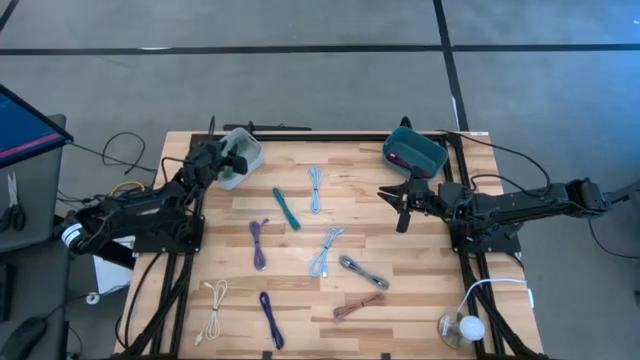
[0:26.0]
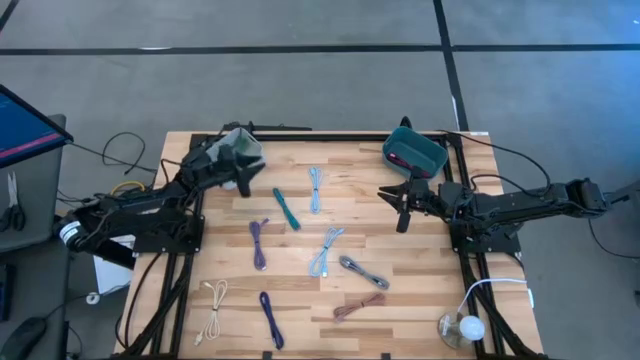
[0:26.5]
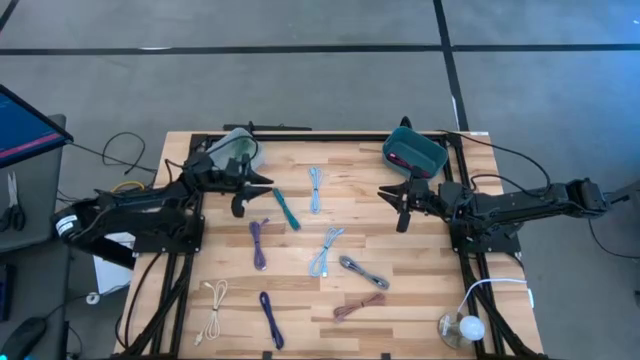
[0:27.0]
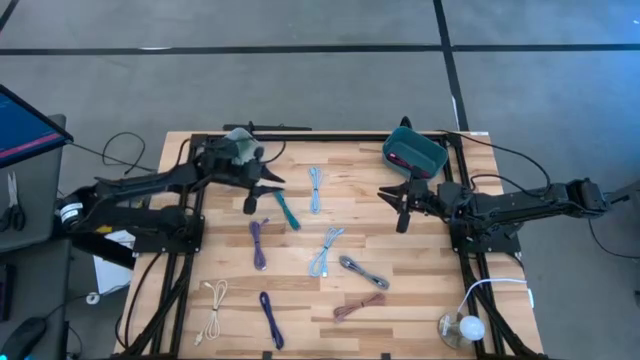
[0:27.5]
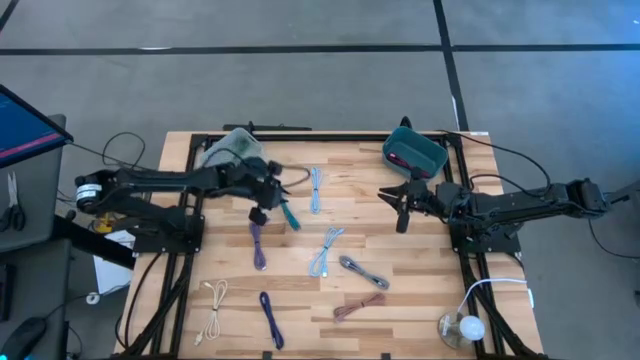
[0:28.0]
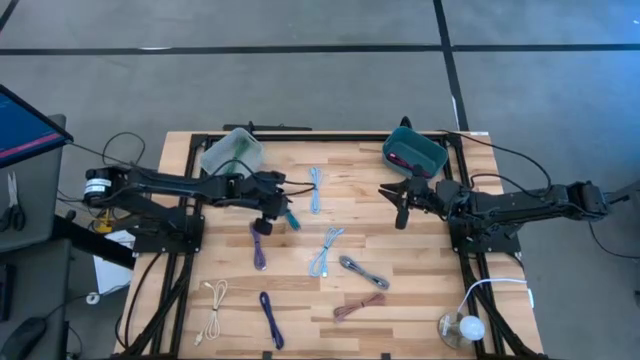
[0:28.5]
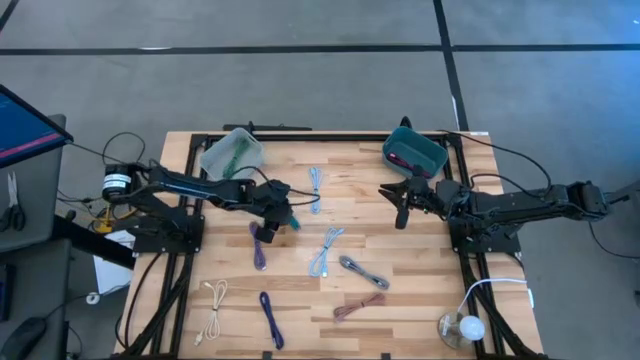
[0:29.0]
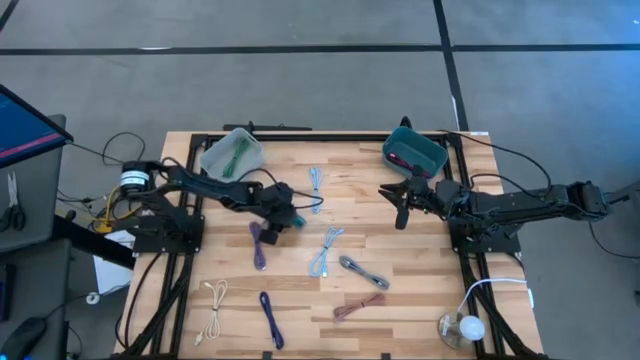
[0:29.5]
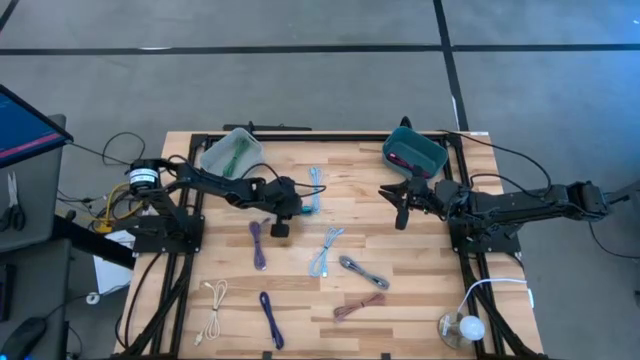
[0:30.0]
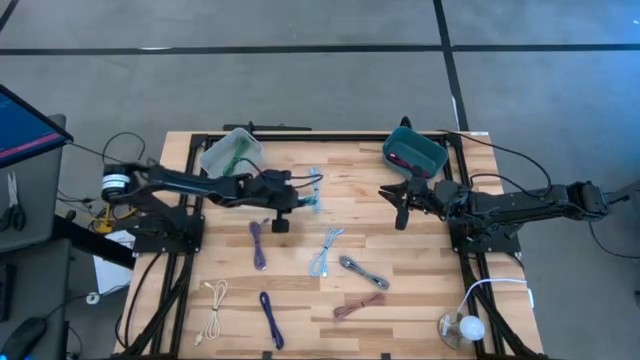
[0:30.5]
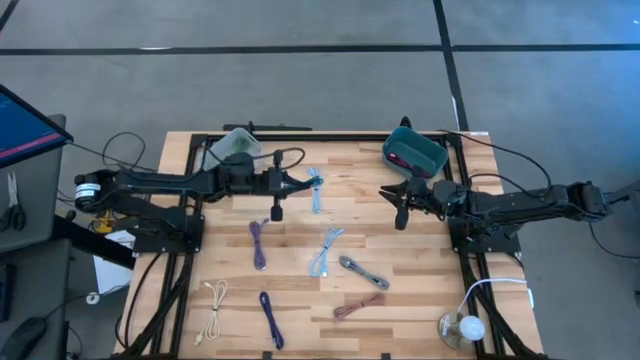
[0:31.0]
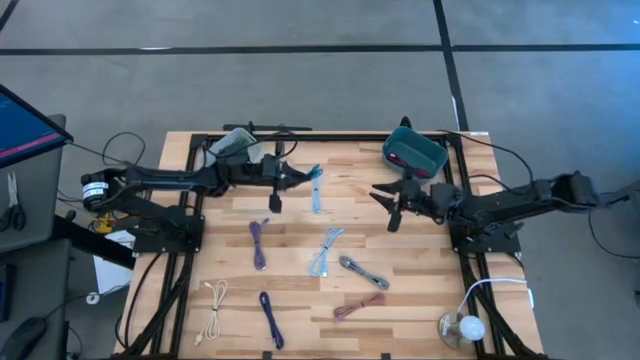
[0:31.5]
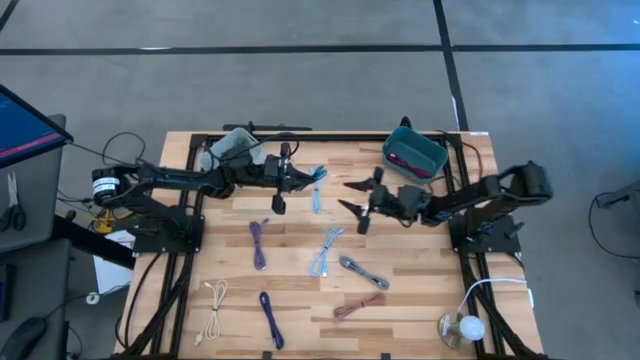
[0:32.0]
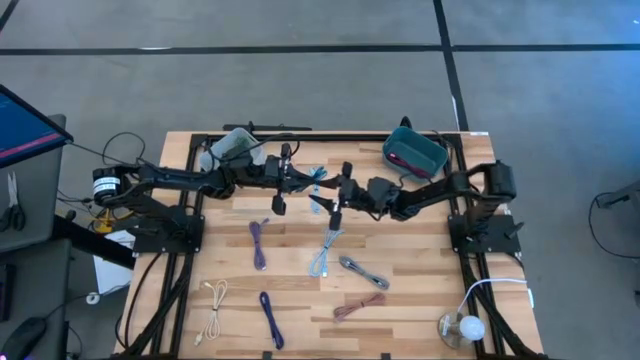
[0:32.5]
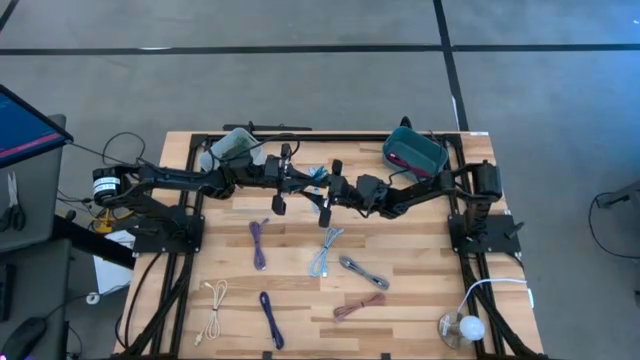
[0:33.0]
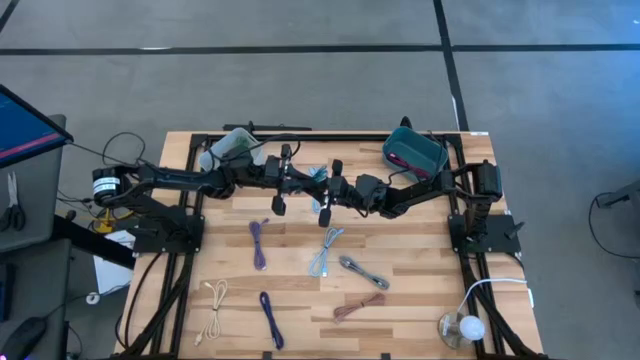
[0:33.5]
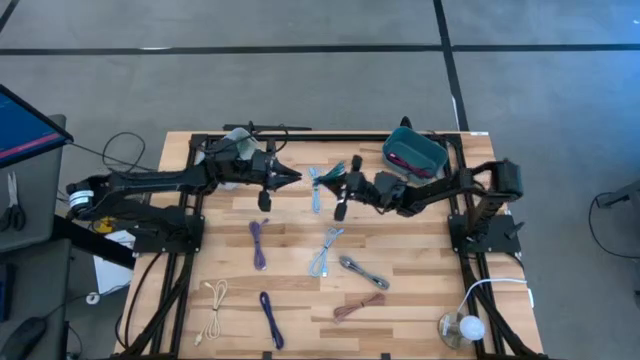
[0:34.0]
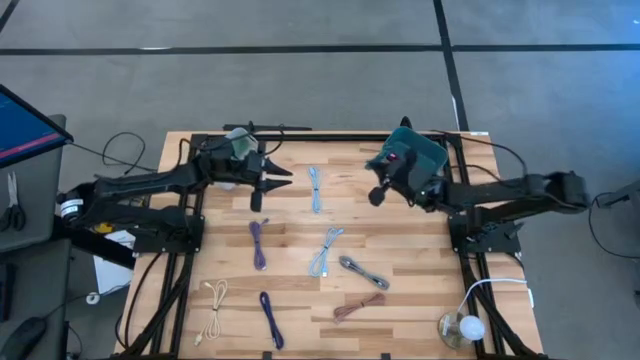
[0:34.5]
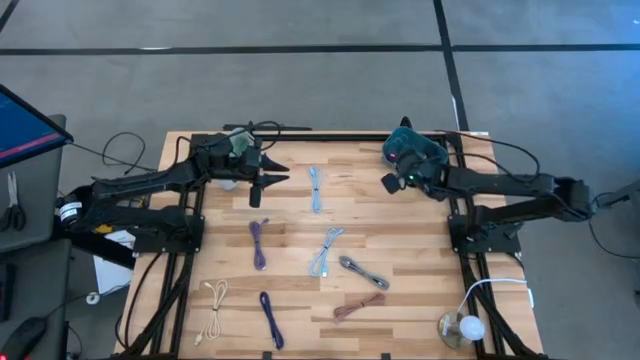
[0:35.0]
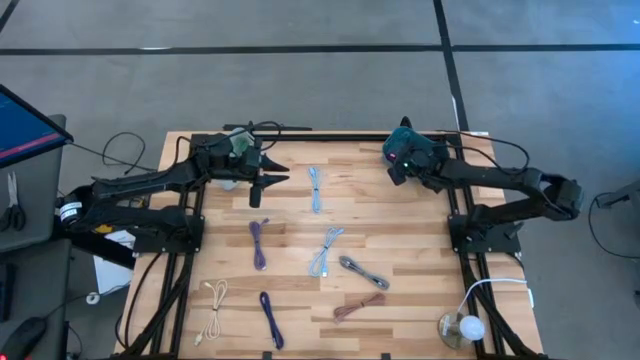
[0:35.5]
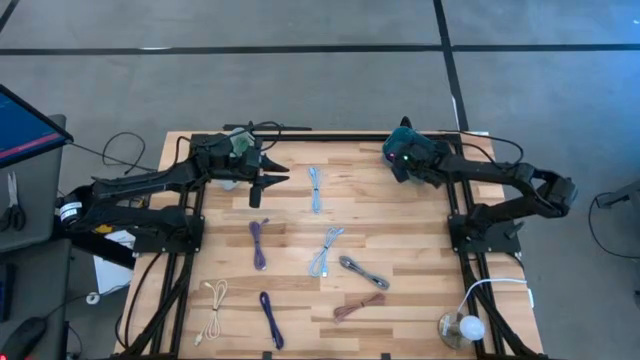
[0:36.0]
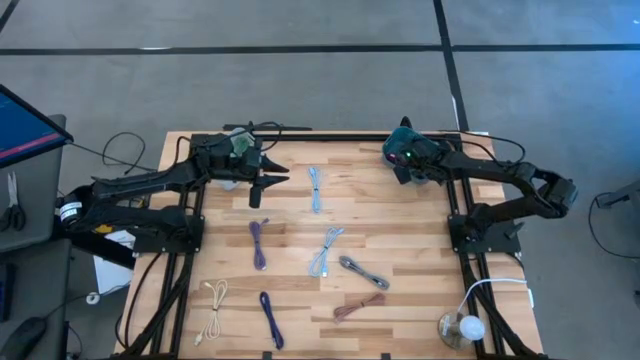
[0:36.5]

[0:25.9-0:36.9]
Task: Pick & Place USB Port
Put the blue black charger cable into the green bin

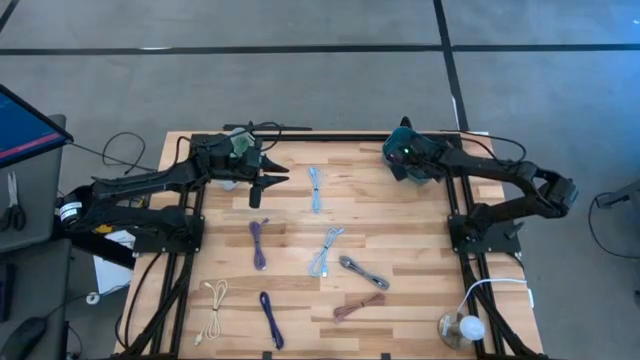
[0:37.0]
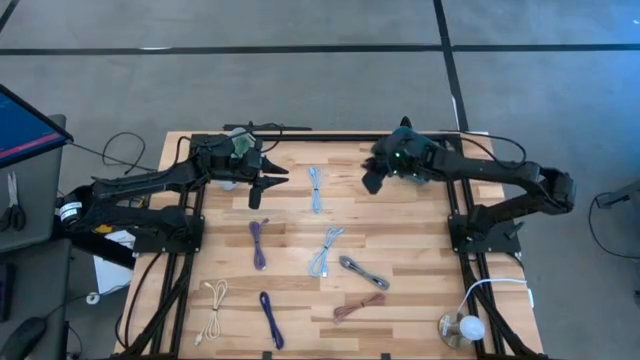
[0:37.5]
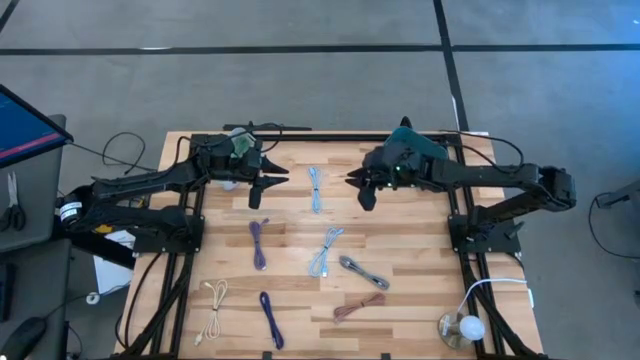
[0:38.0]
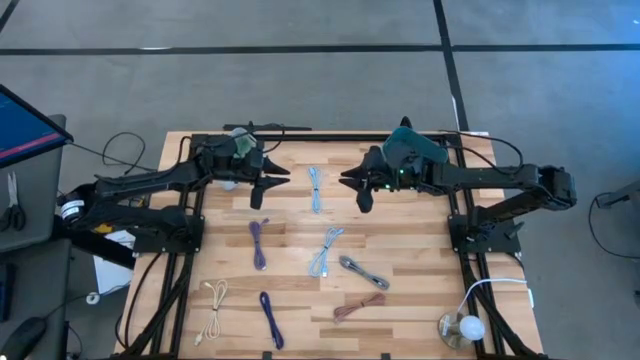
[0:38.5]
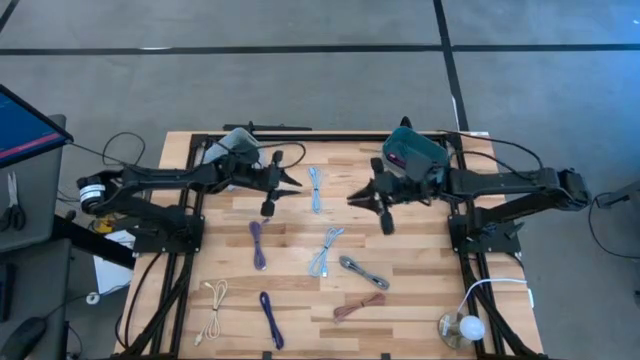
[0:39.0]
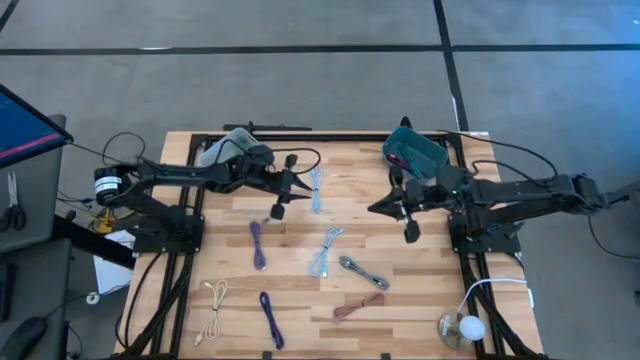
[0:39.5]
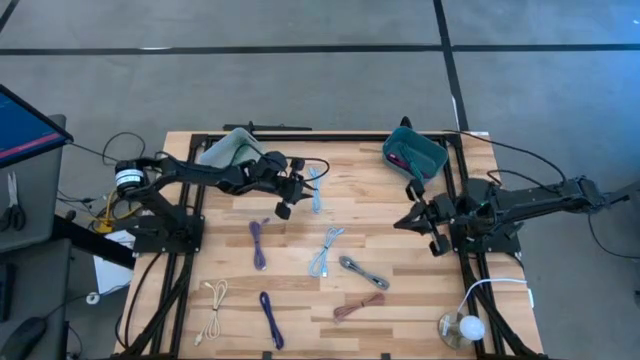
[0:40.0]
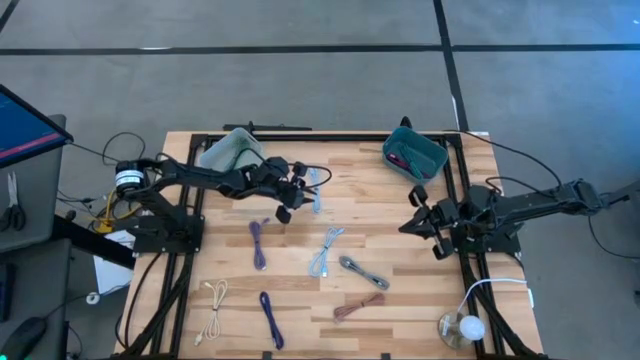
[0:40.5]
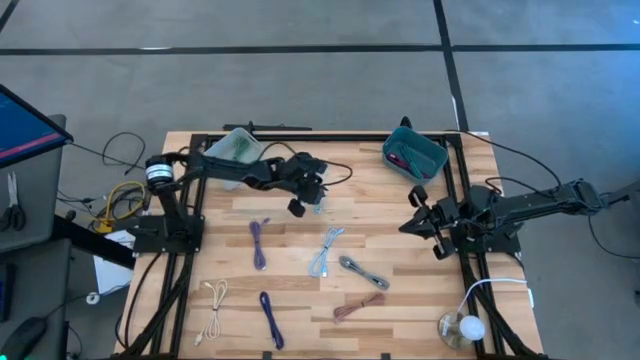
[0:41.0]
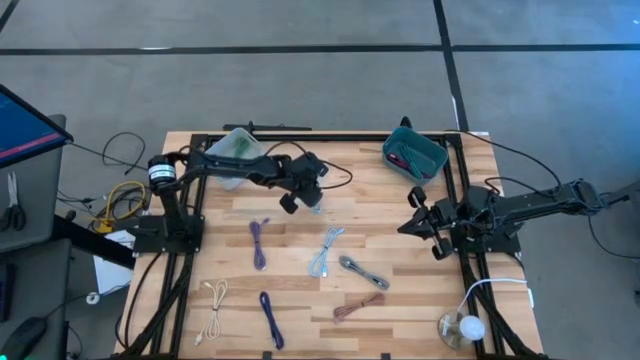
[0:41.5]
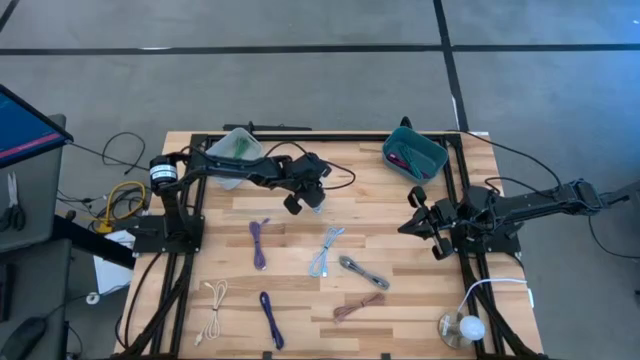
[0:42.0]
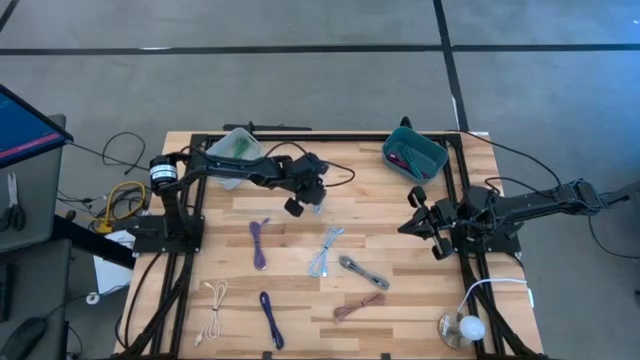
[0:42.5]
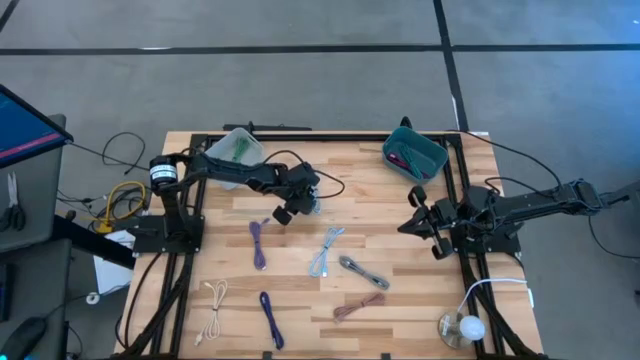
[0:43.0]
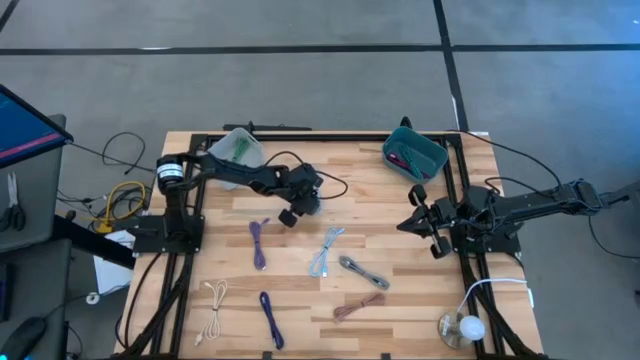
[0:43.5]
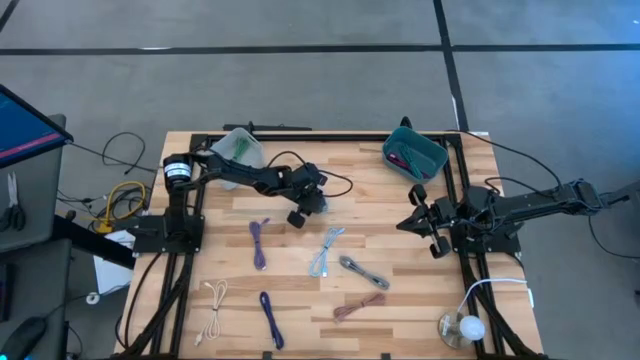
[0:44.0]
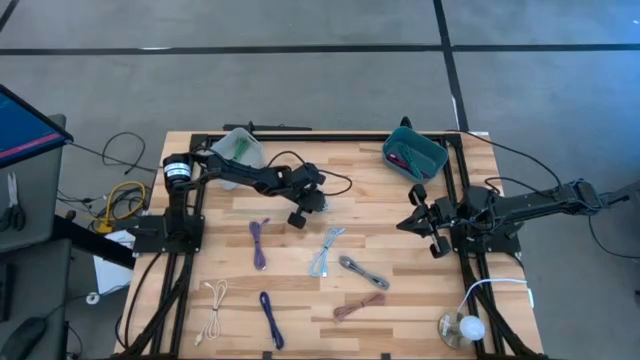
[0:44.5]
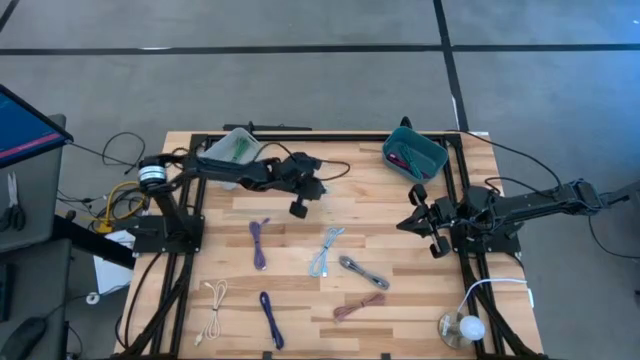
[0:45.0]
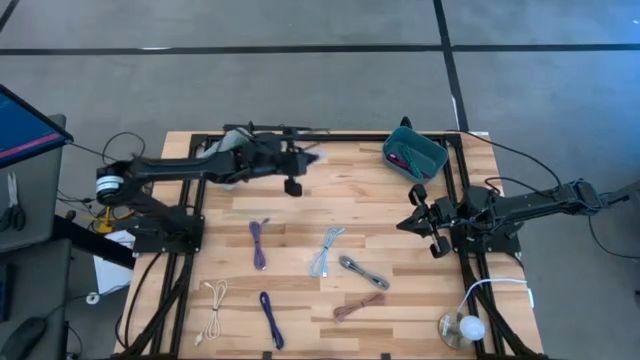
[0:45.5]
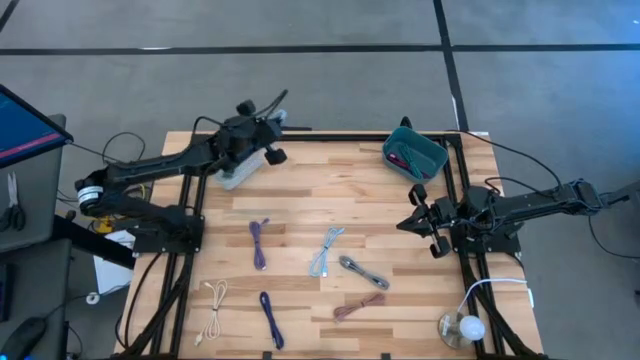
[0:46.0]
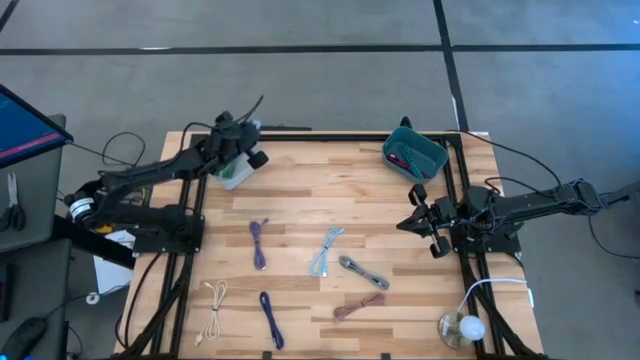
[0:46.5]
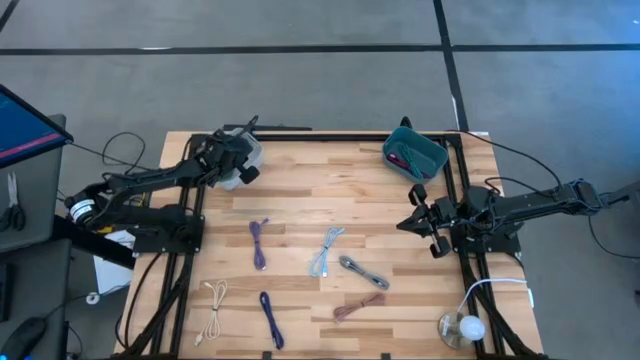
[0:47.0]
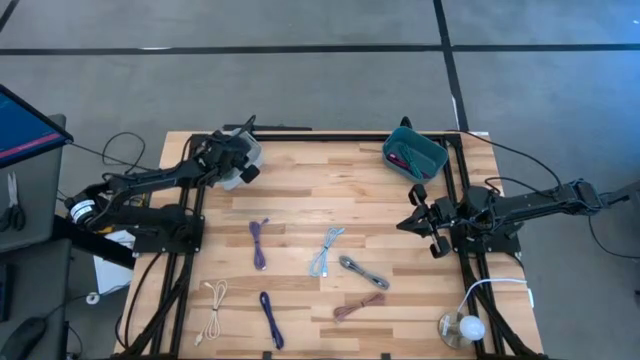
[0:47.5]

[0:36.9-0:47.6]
Put the top blue charger cable into the white bin
